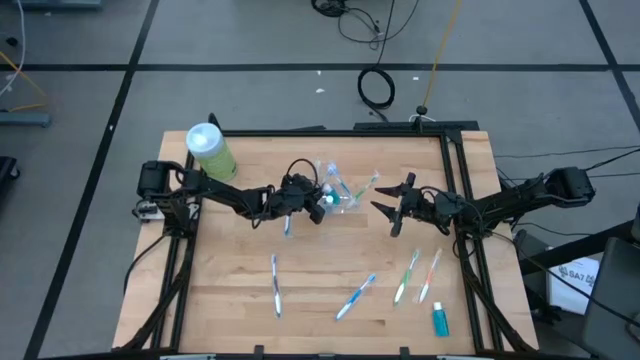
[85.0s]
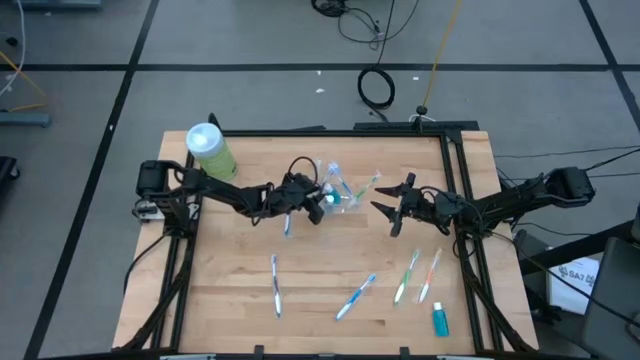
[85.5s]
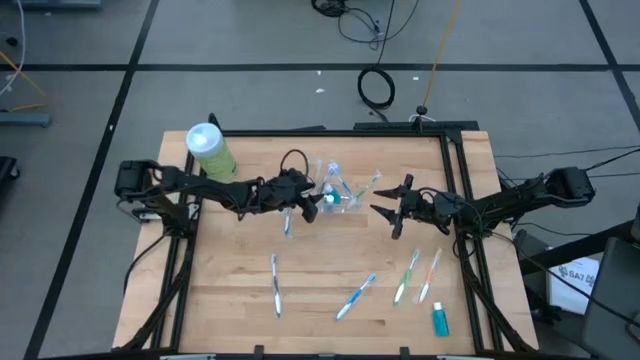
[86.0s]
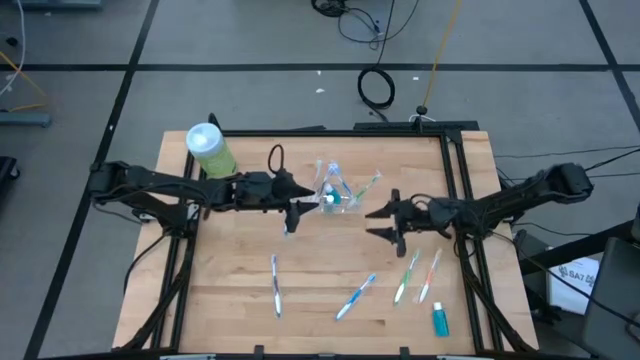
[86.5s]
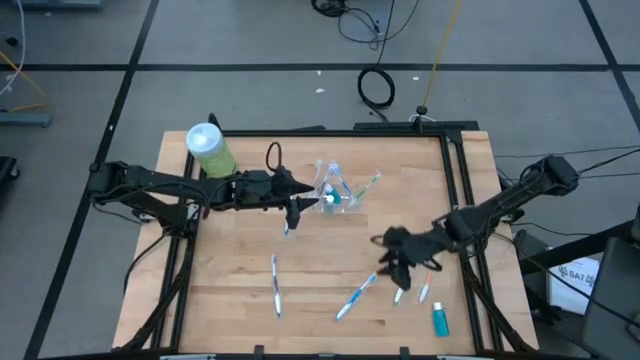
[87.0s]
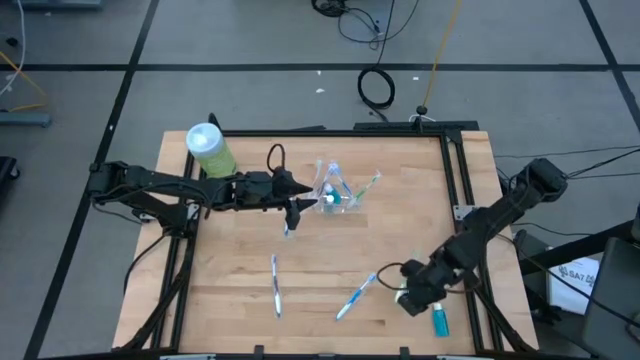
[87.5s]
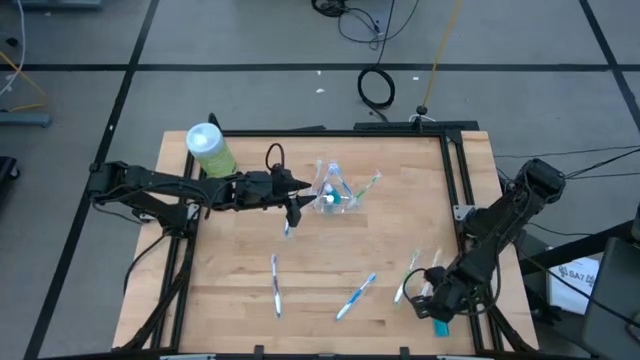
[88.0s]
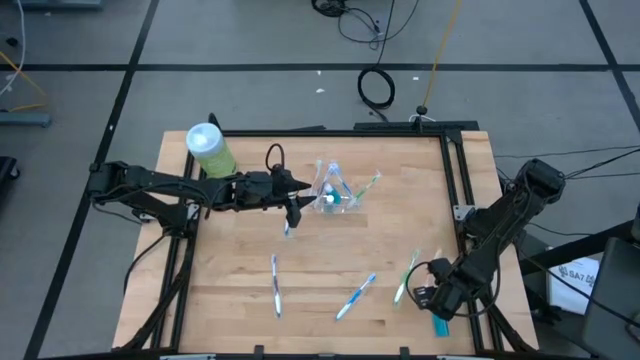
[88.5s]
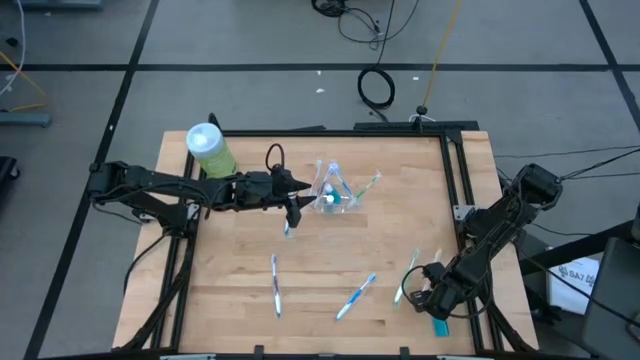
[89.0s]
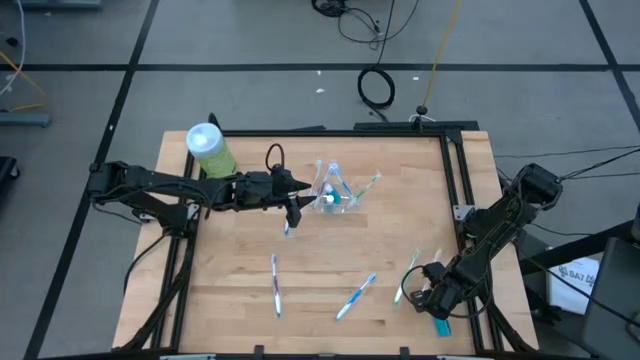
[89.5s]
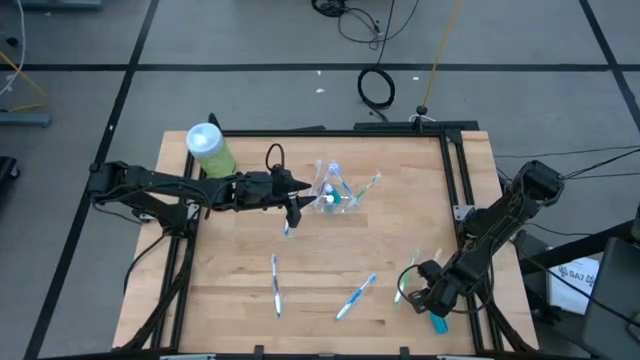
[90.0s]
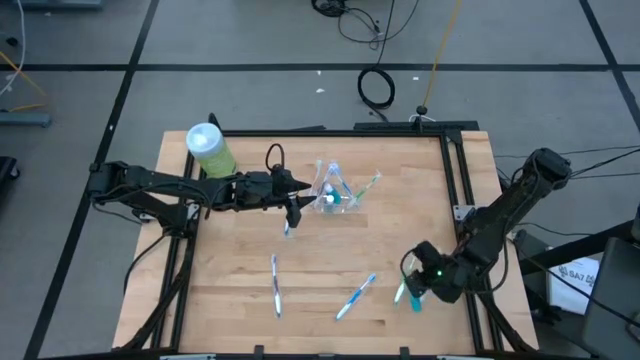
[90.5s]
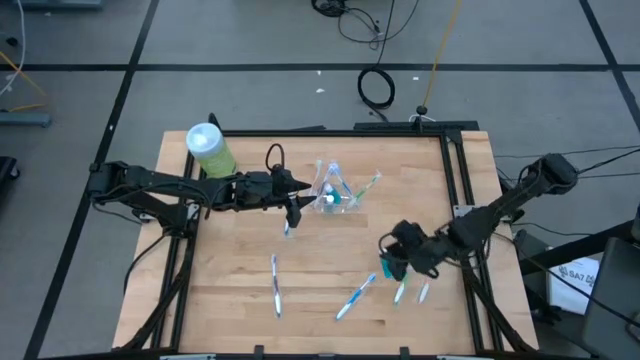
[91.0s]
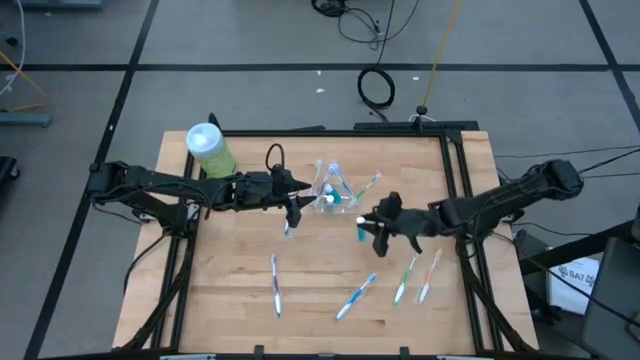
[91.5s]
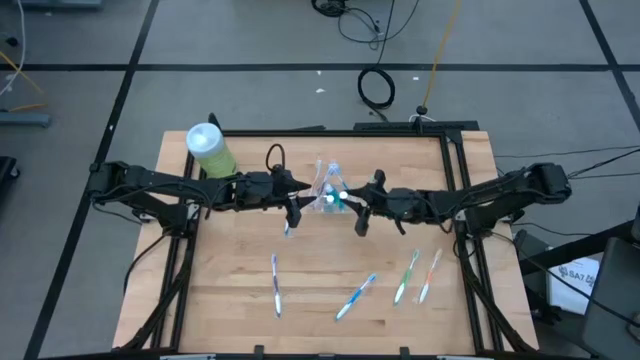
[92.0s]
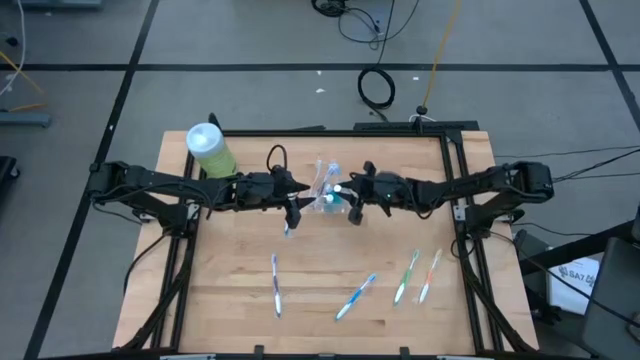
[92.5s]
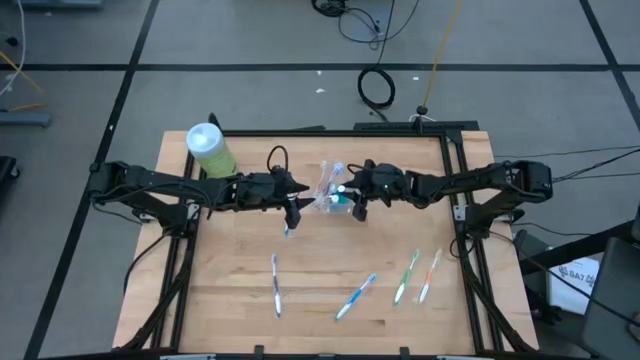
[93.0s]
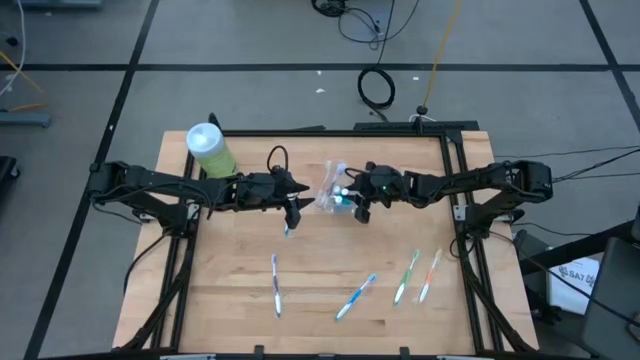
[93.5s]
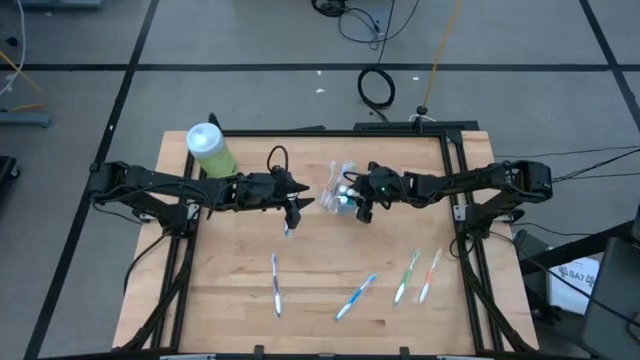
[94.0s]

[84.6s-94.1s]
Task: Pick & Place toothbrushing station
Put the left small mouthwash bottle into the middle section of the transparent organizer

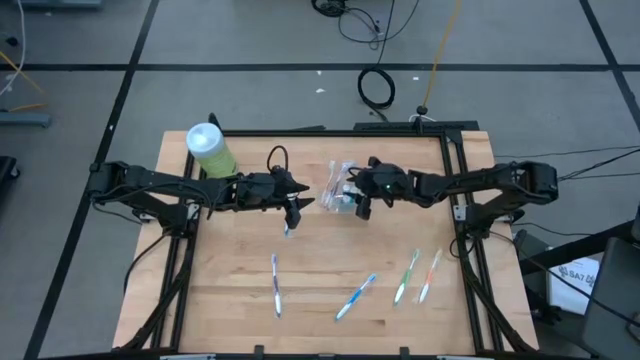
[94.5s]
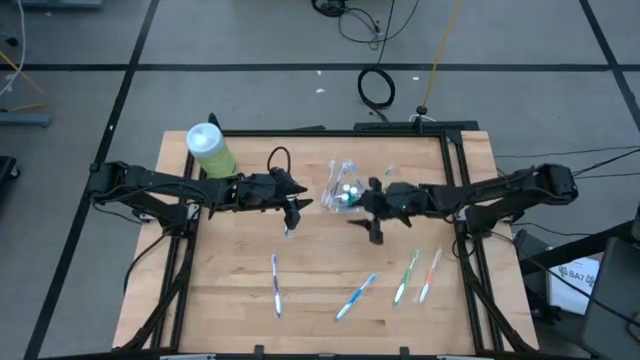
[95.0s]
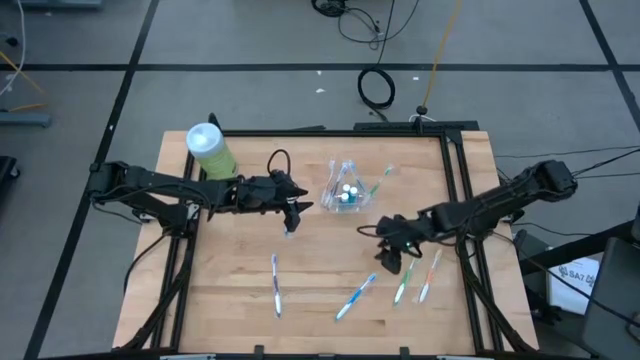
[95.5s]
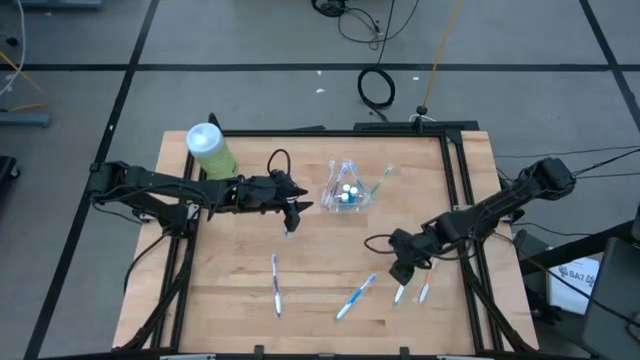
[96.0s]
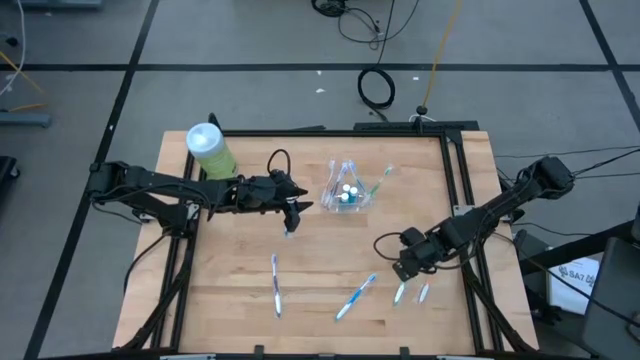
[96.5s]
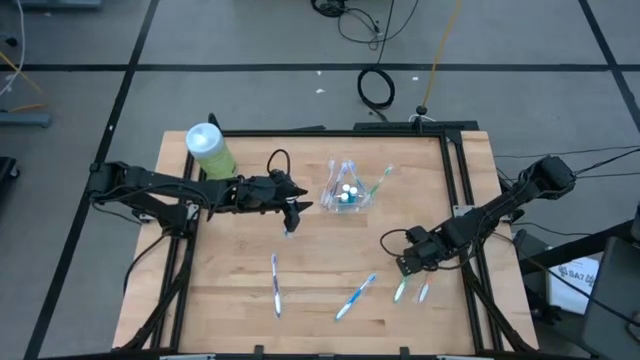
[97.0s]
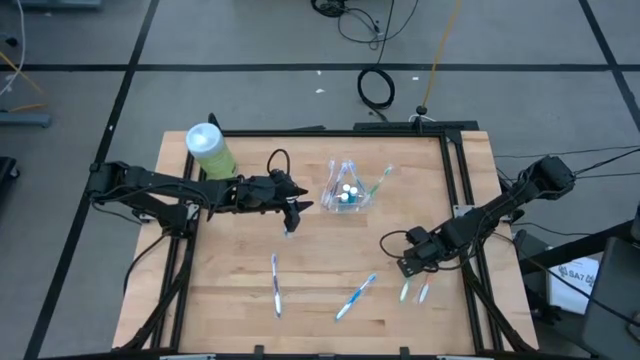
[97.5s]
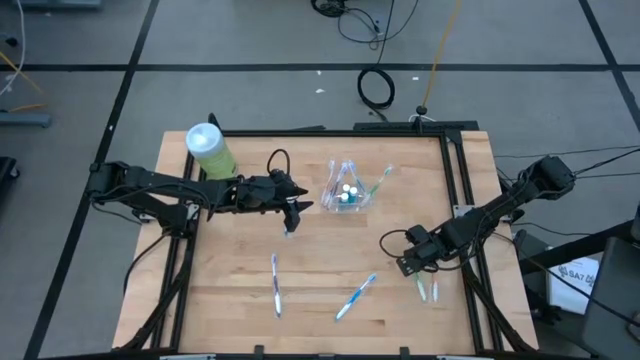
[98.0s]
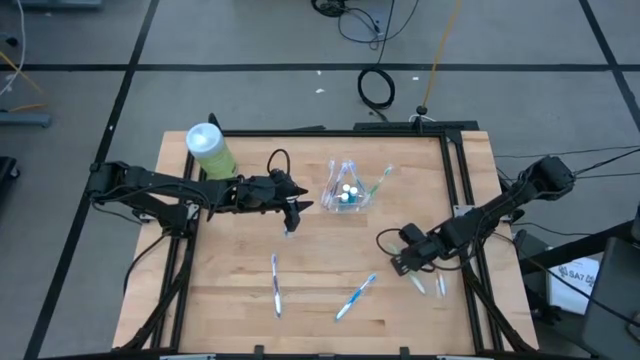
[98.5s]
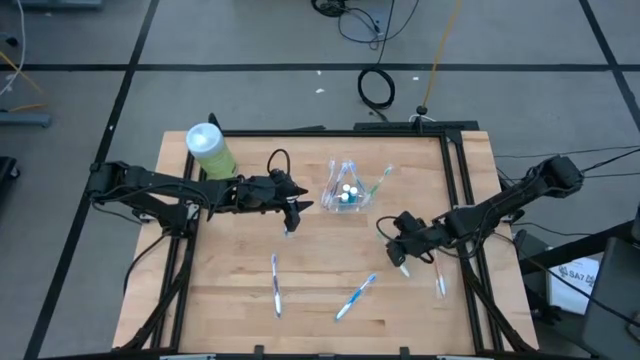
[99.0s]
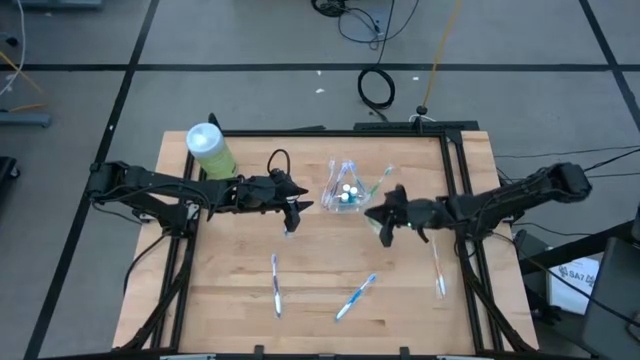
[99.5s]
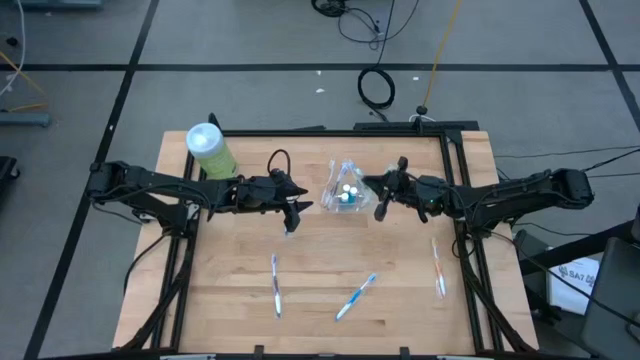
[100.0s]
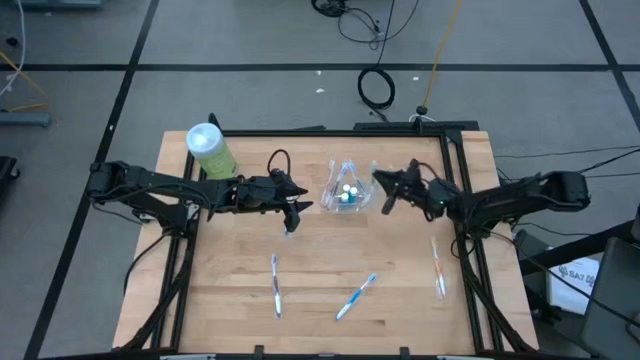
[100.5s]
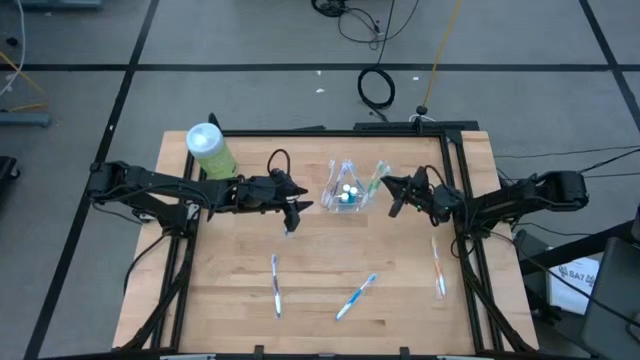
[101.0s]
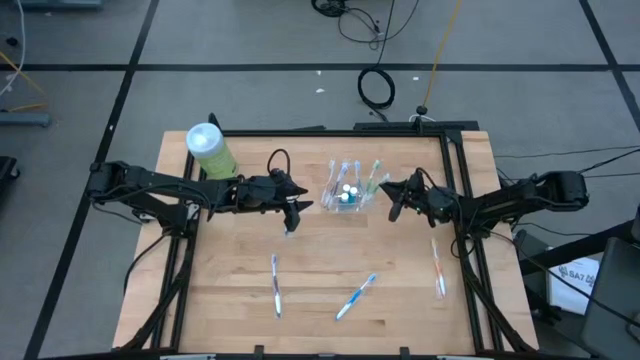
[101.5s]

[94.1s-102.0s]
Put the green toothbrush into the right section of the transparent organizer

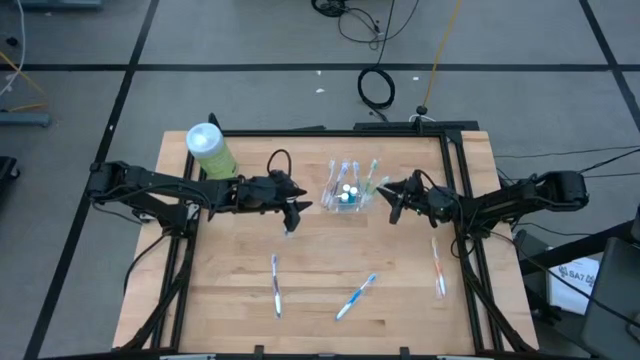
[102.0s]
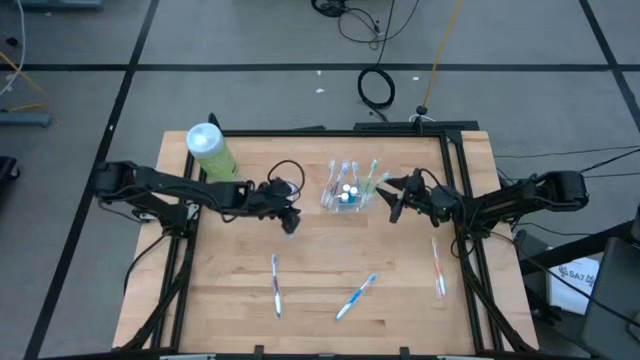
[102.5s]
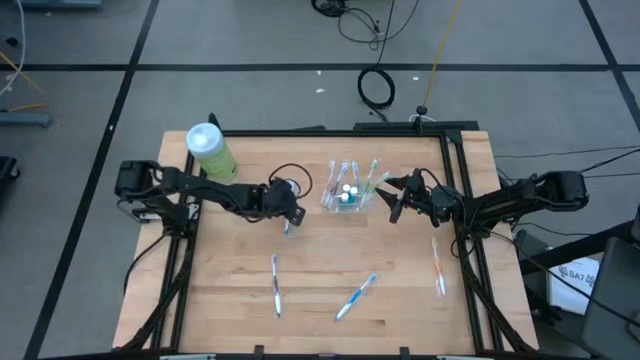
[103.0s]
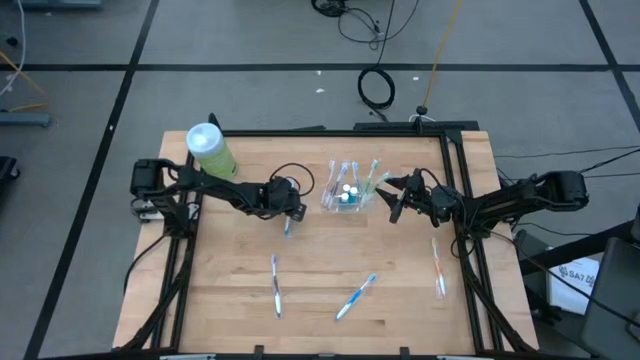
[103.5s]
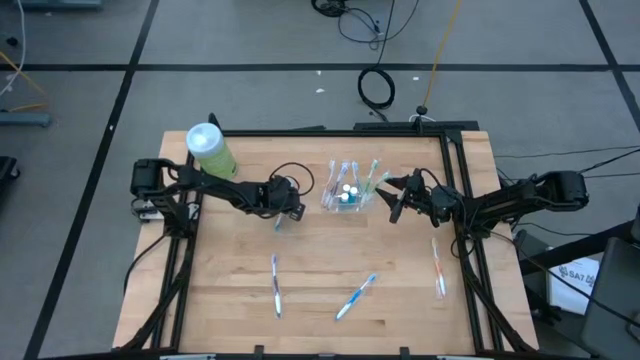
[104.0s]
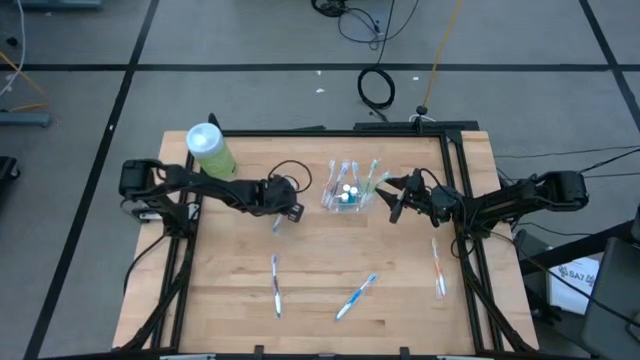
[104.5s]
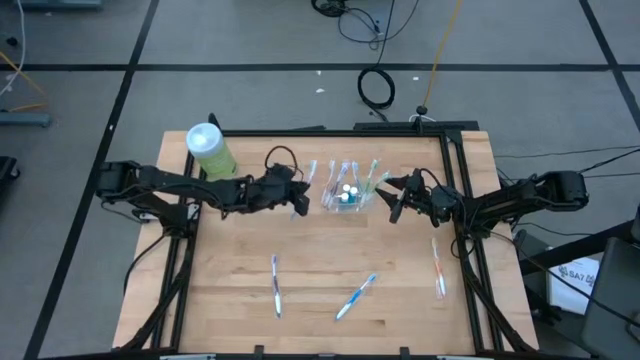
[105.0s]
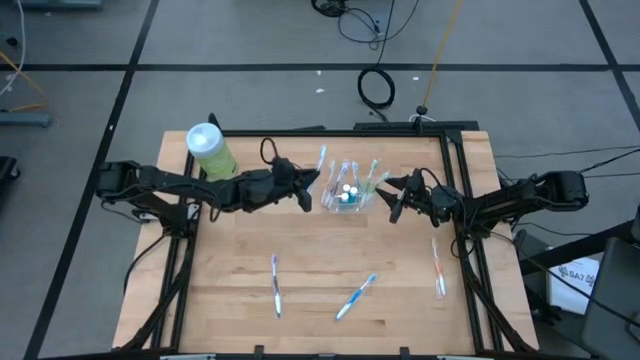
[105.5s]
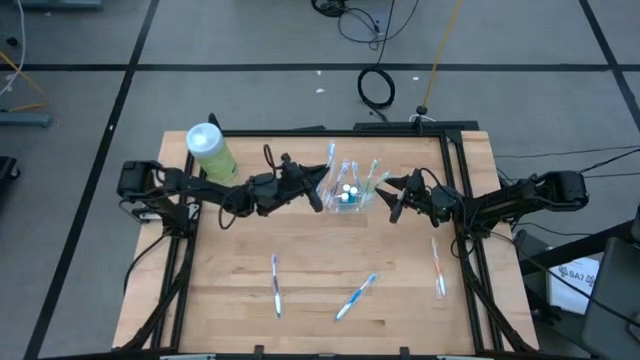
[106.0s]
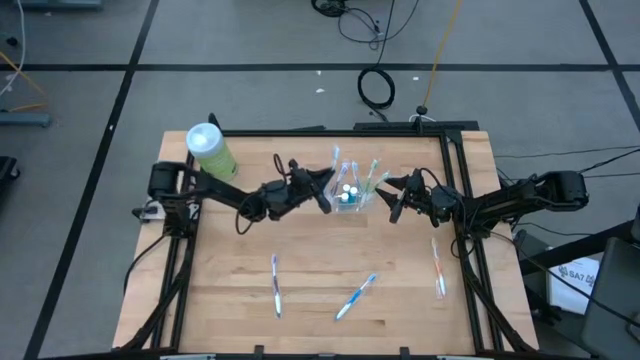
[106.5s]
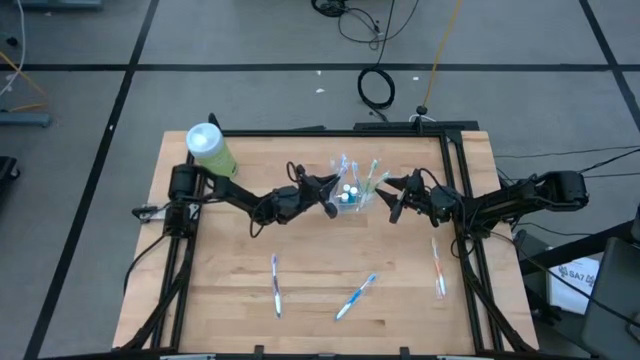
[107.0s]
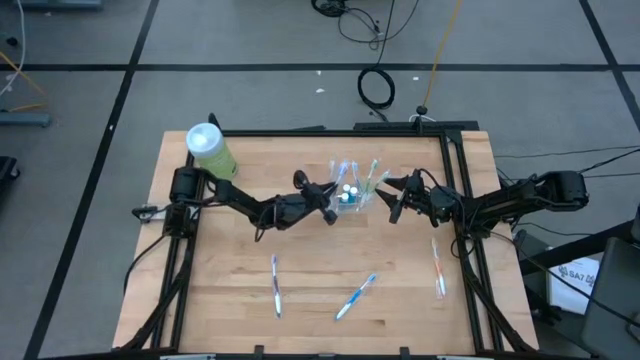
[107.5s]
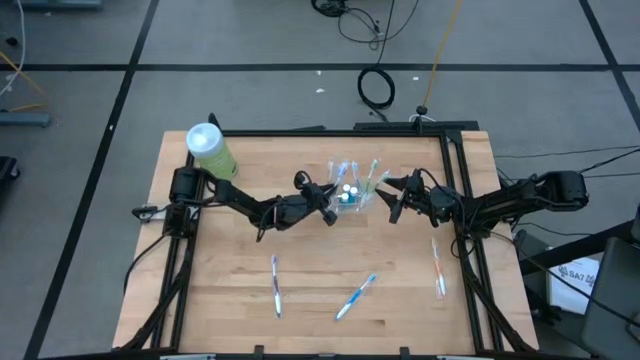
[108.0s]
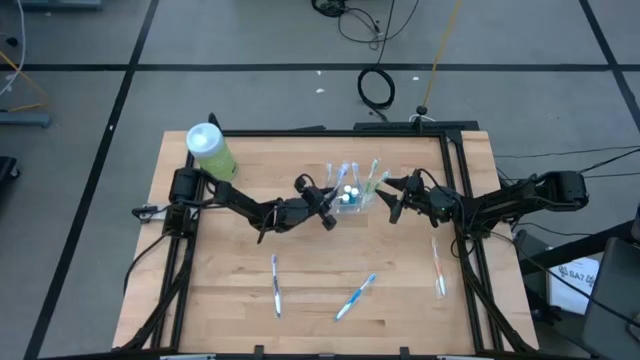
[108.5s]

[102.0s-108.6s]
Put the left blue toothbrush into the left section of the transparent organizer
